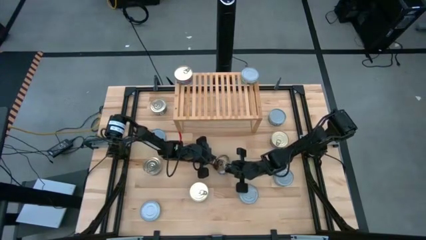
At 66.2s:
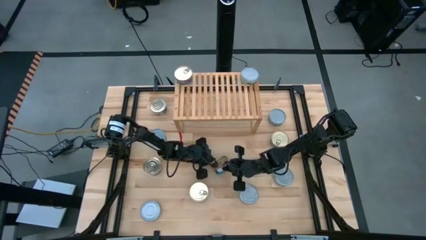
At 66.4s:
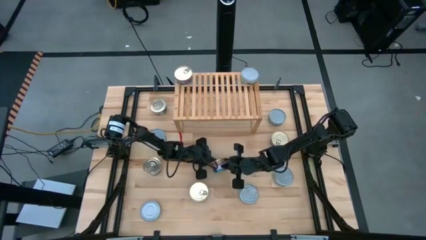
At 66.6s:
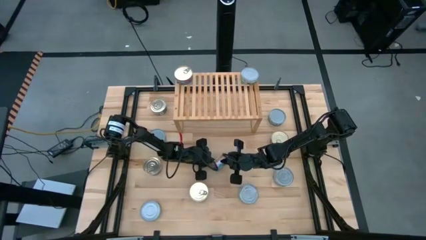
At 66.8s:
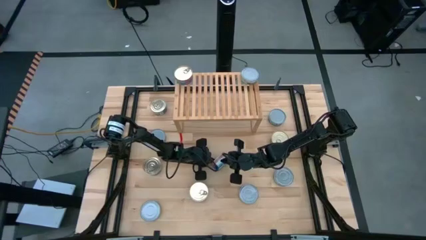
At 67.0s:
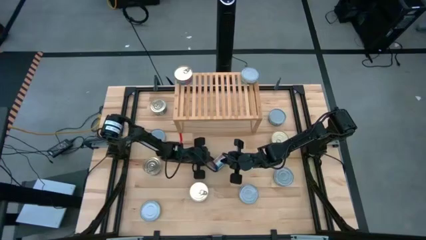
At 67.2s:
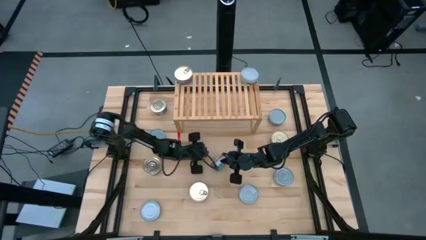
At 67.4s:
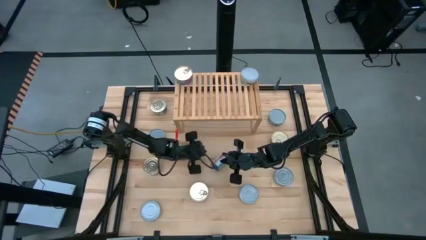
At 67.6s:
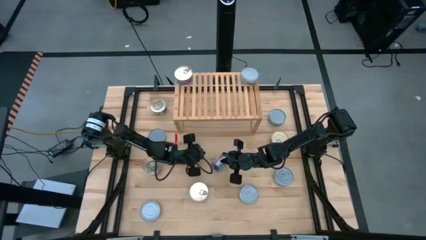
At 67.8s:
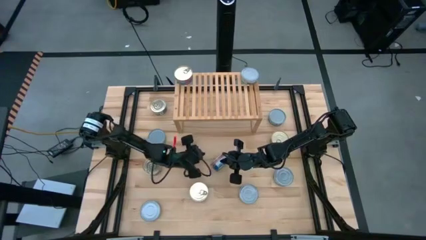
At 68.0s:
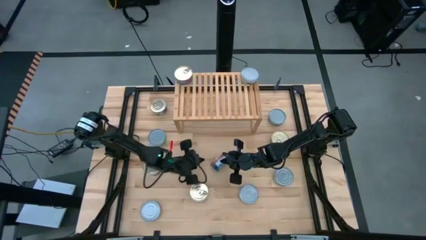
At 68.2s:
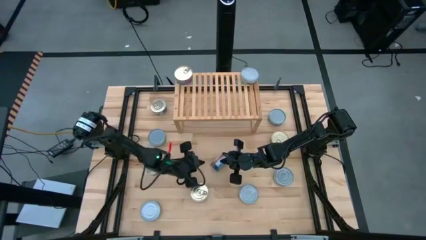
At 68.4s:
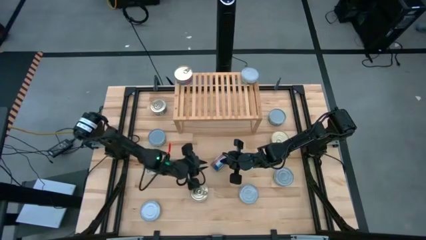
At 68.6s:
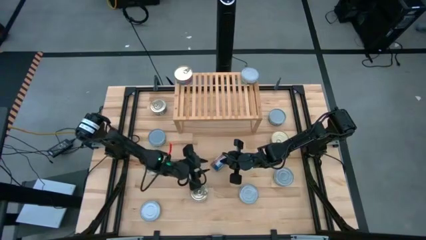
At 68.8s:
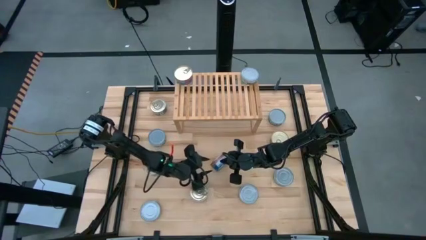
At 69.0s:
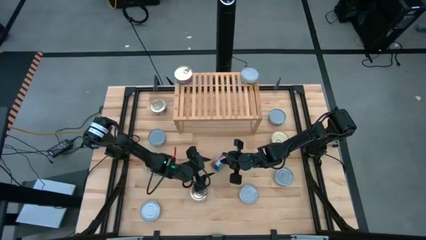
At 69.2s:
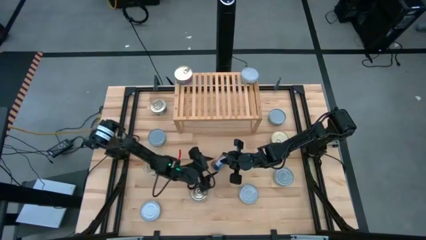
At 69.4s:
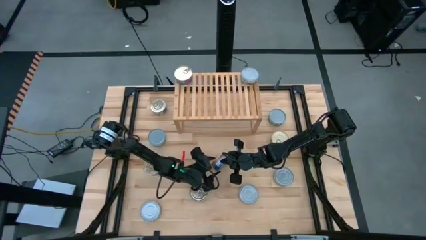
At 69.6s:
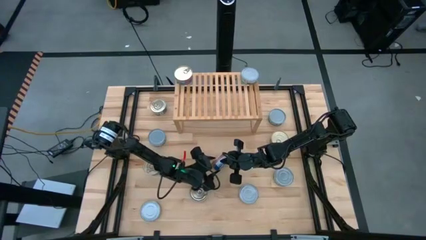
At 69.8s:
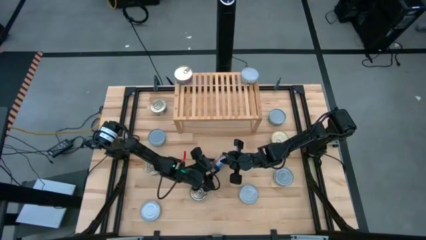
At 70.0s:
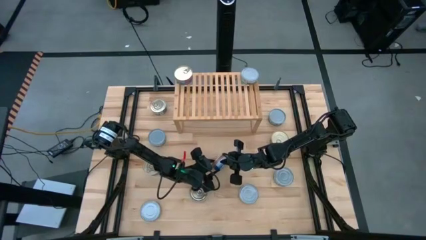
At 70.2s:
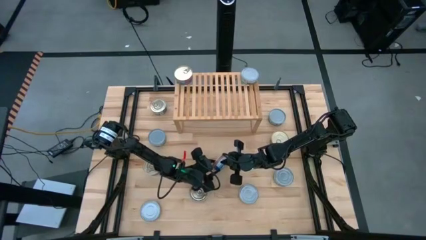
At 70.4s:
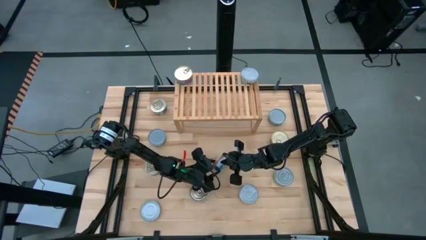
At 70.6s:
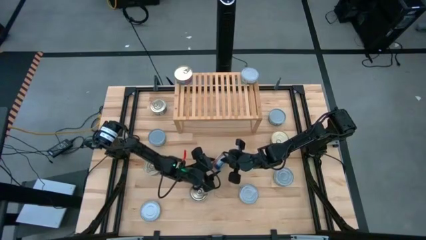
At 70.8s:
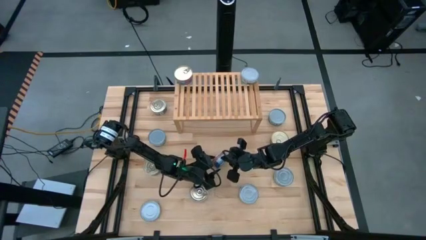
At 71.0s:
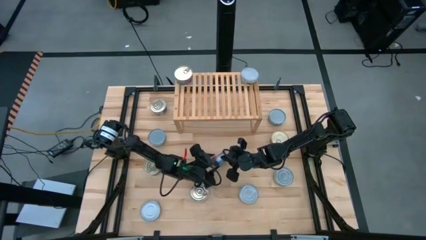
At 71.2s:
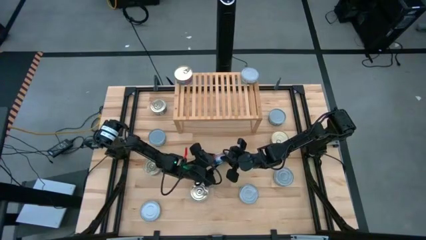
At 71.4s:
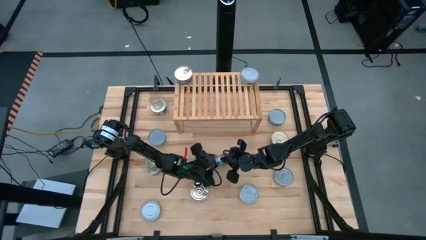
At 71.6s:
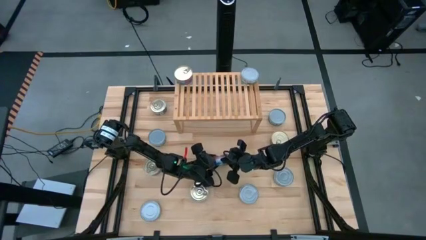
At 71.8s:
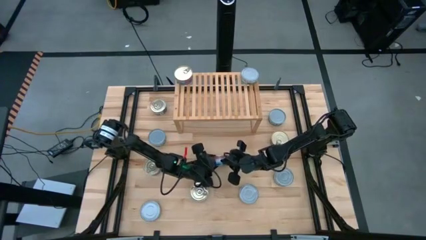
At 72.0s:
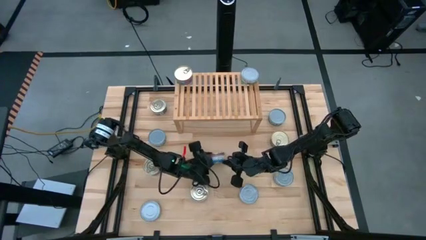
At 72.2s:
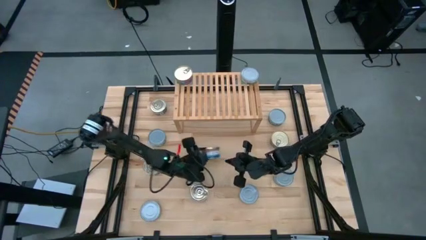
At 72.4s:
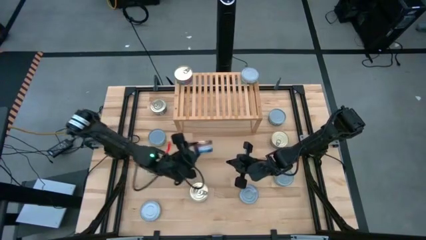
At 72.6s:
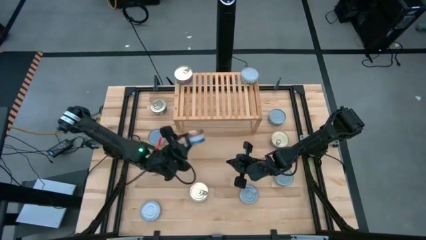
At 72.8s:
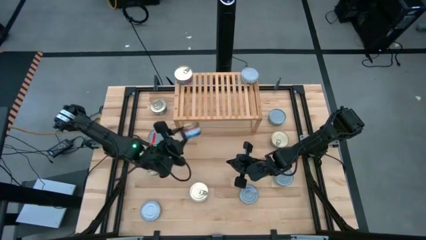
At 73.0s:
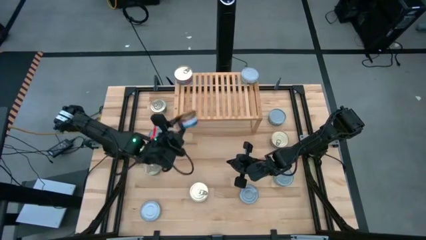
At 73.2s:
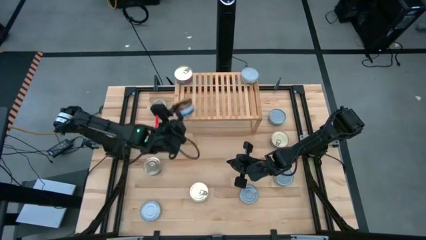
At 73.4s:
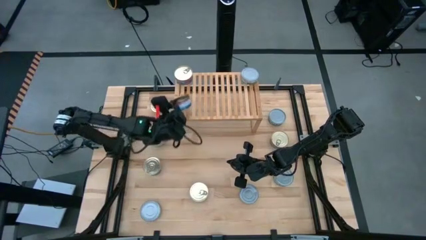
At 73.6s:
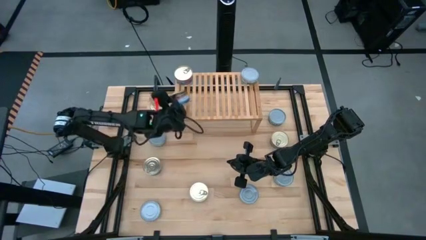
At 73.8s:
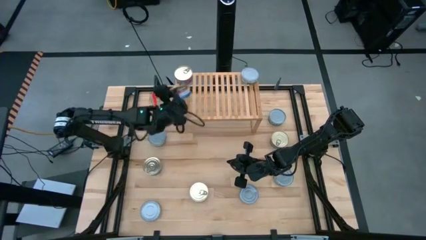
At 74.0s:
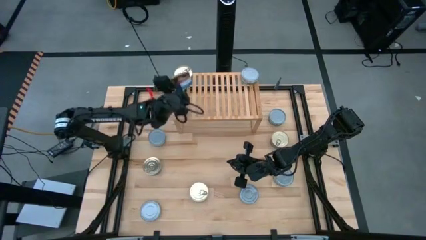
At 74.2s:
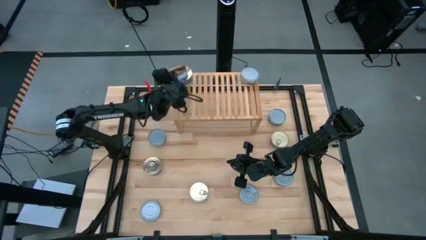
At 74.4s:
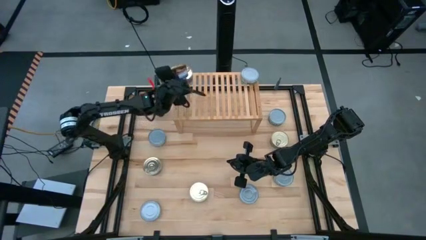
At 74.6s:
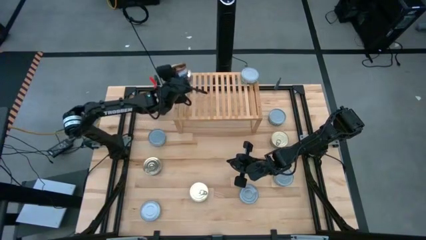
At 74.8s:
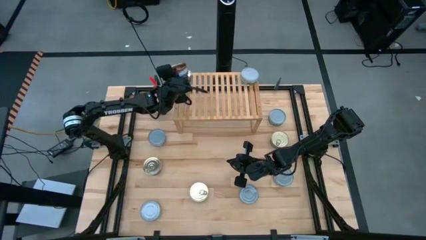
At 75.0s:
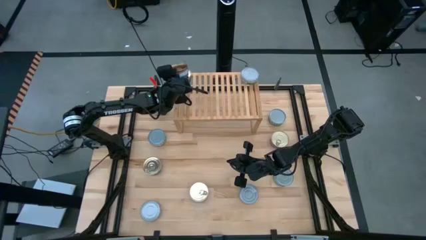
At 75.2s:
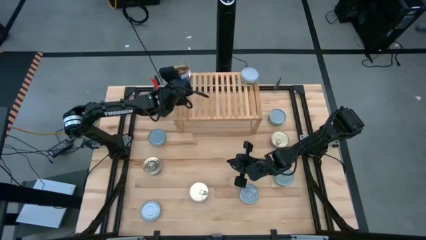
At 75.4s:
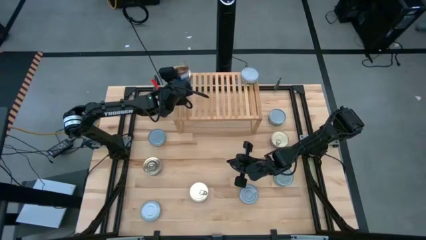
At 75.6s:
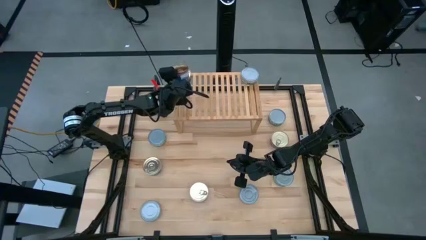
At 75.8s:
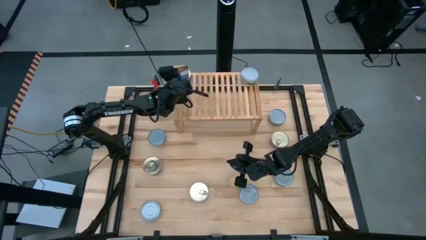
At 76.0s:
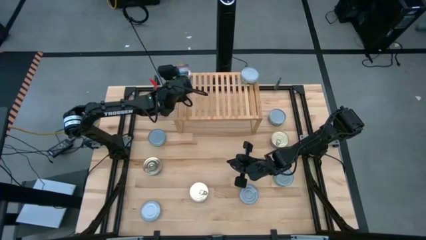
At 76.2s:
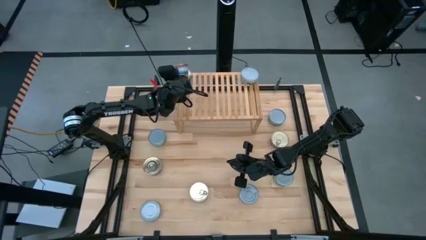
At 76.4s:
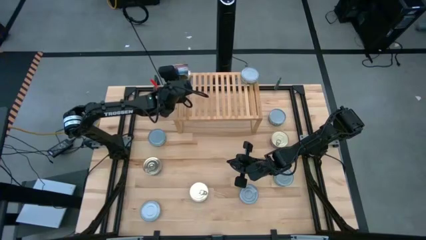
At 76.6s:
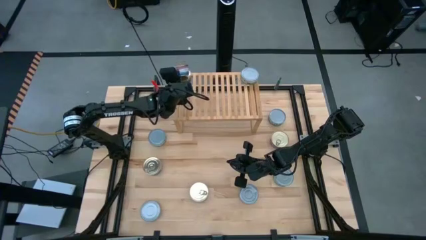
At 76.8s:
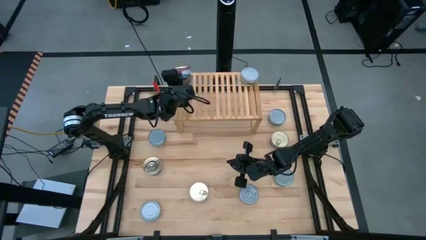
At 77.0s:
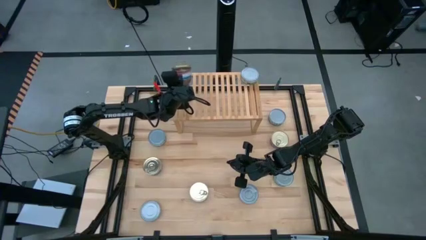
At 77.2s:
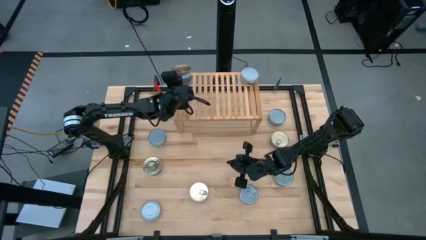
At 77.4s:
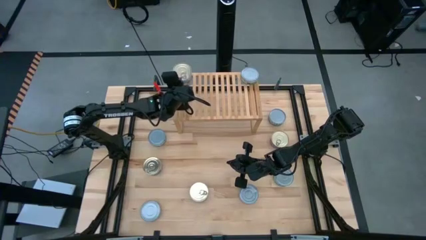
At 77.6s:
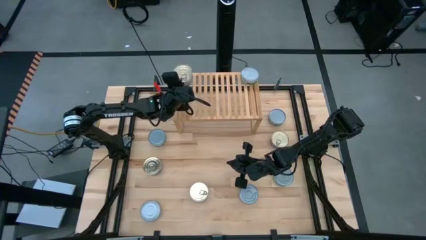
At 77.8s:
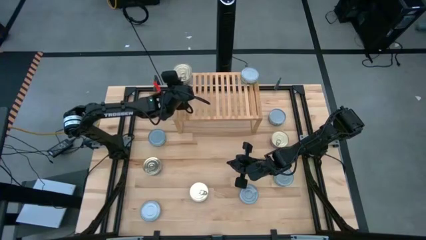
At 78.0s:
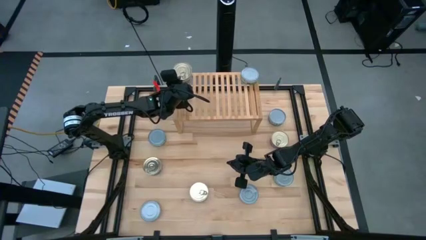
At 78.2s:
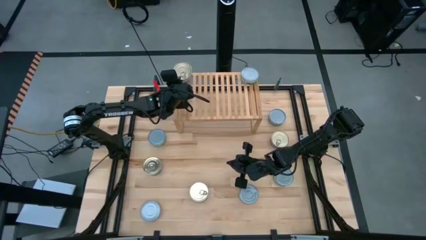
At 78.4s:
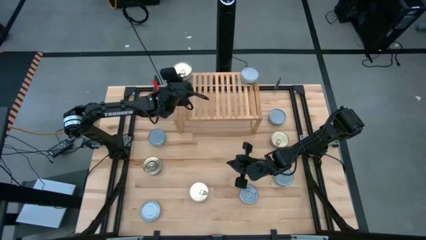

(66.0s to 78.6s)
Task: Stack canned seafood by type on shelf
Put the blue-pink tuna can on the shelf

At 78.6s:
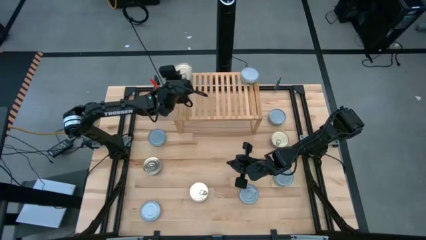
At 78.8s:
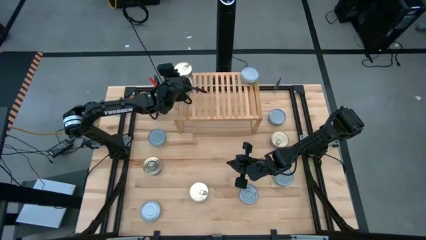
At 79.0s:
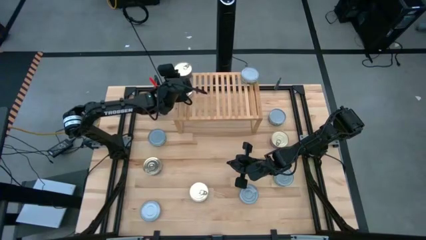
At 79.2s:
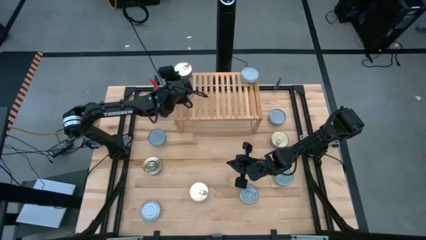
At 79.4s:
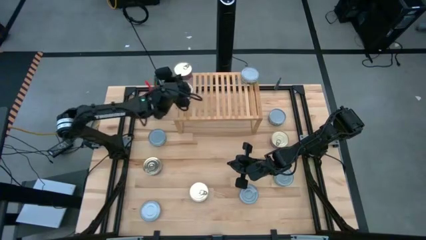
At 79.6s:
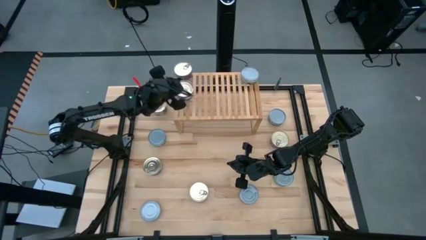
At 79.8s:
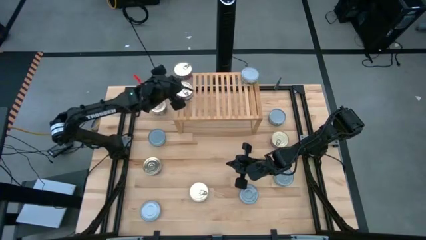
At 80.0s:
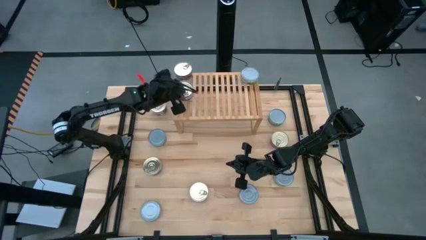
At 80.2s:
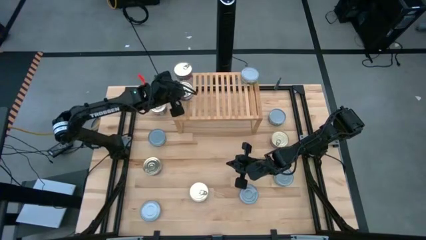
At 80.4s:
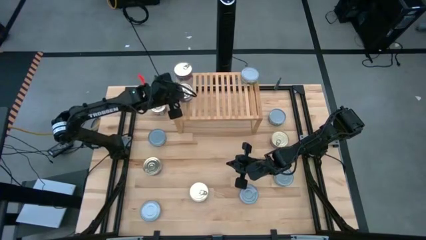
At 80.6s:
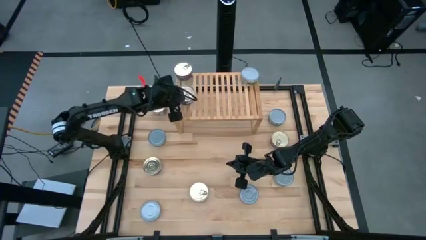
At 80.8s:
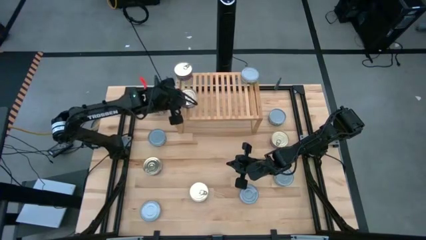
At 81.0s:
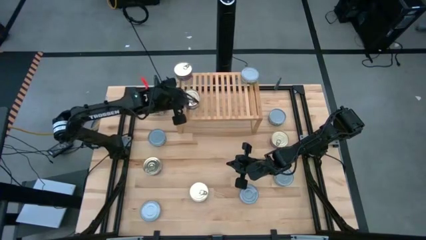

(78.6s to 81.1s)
Put the blue-pink tuna can on the shelf

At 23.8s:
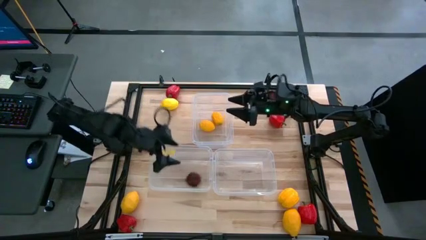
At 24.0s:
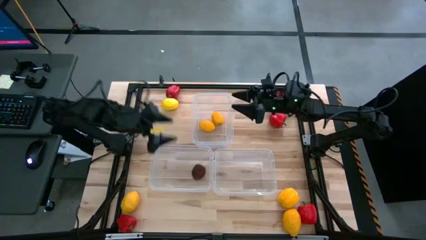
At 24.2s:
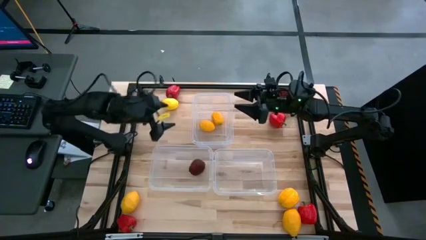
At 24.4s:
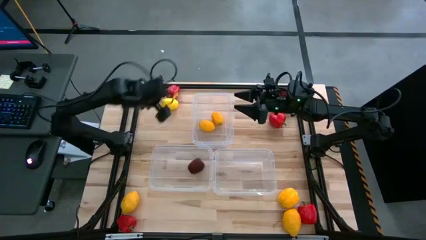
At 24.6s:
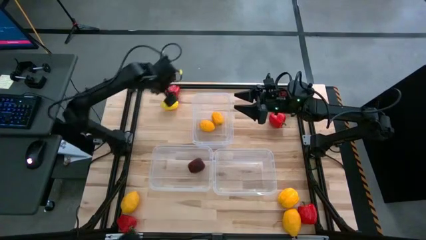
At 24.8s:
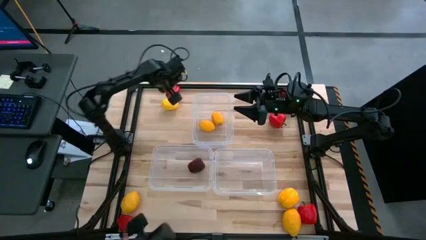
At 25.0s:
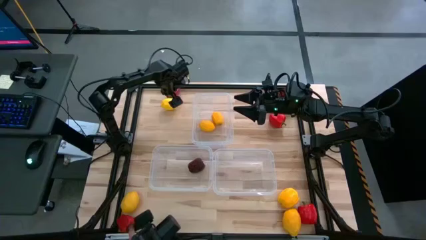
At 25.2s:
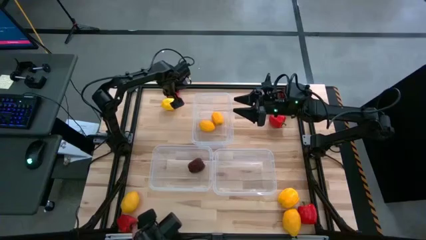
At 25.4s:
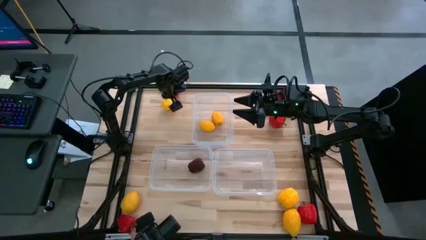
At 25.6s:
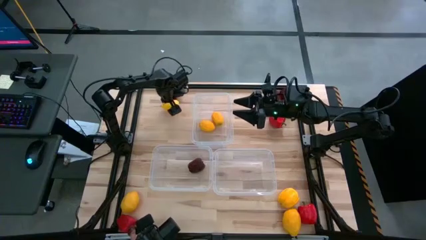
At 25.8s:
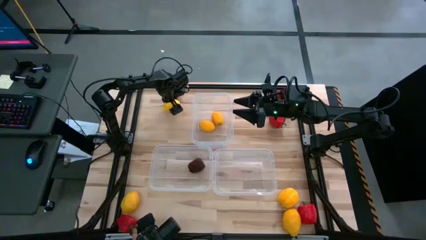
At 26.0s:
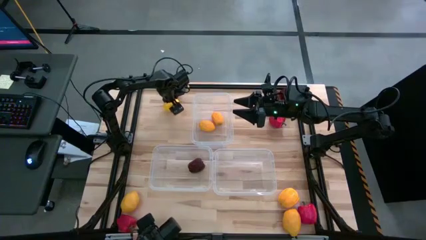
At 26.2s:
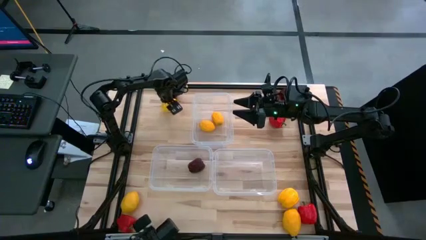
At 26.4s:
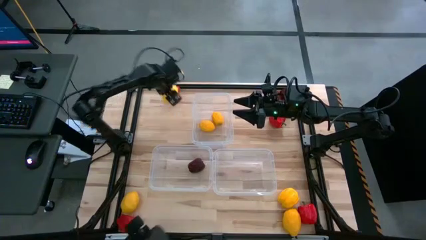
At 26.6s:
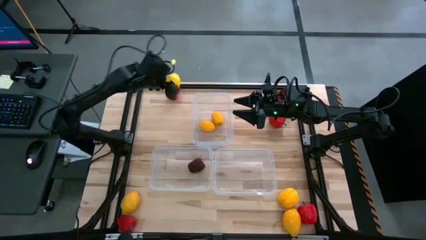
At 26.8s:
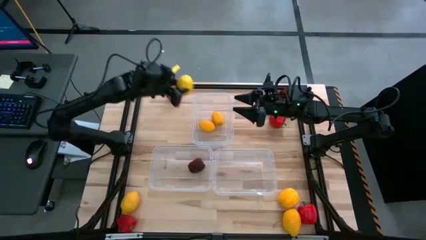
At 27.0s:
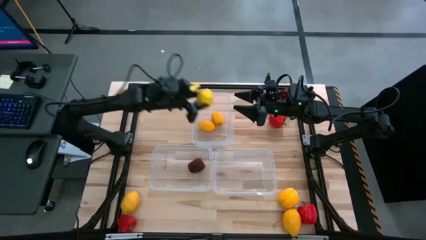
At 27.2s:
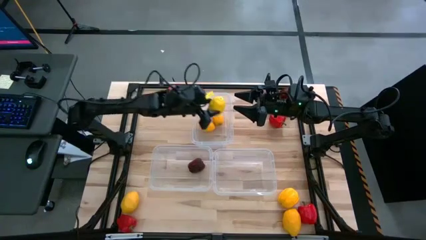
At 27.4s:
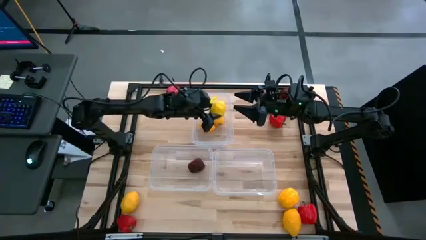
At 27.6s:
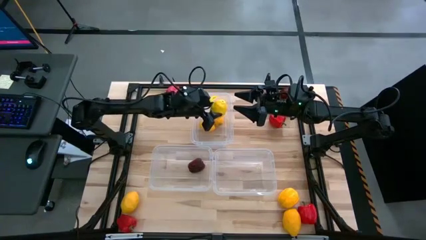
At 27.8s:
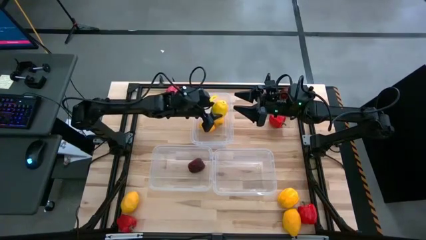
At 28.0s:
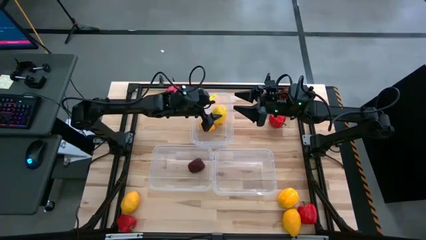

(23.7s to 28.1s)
Task: Sort produce into baskets
Put the yellow lemon into the top center transparent bin
